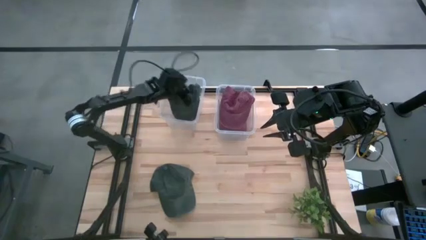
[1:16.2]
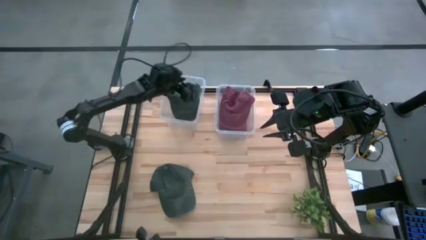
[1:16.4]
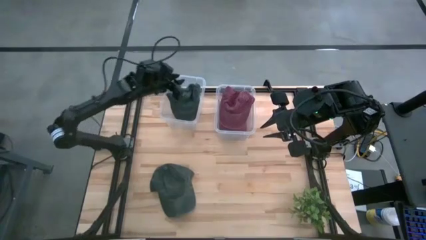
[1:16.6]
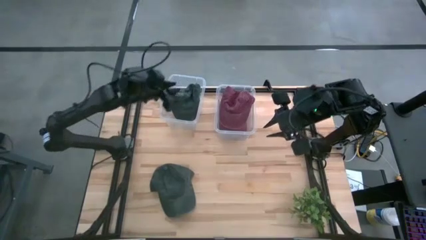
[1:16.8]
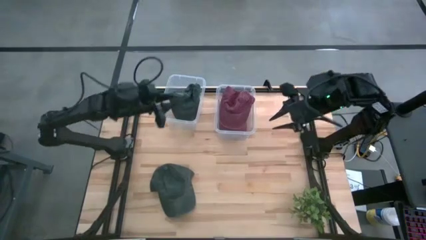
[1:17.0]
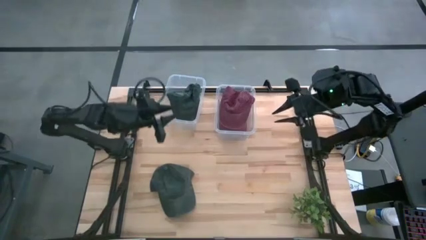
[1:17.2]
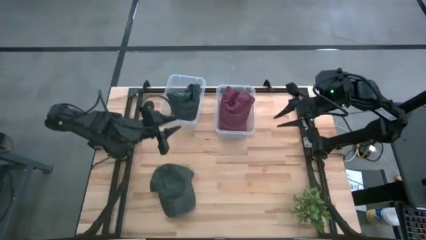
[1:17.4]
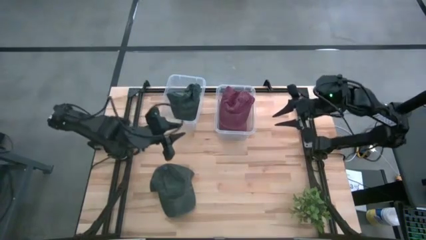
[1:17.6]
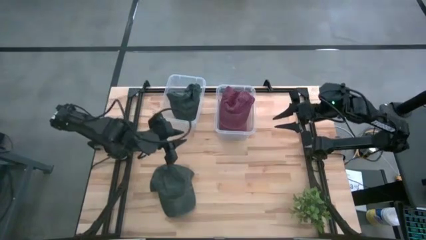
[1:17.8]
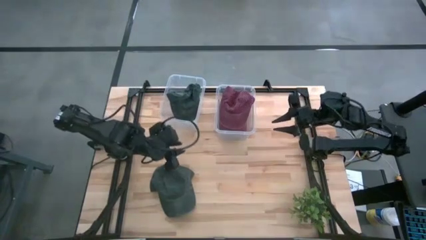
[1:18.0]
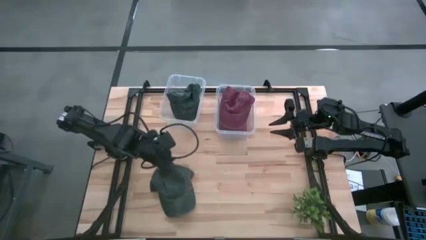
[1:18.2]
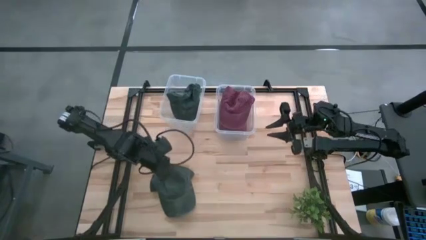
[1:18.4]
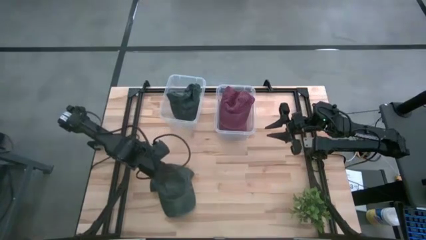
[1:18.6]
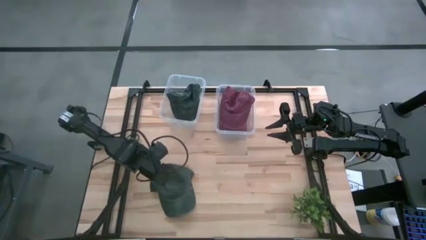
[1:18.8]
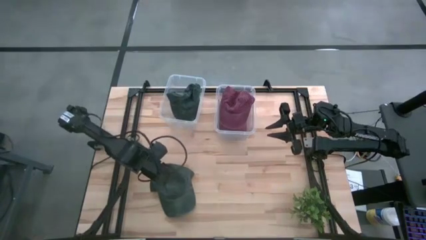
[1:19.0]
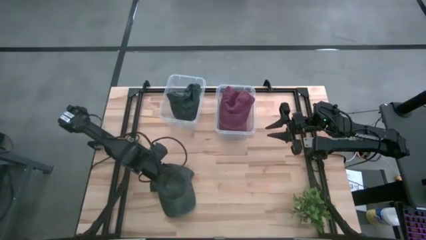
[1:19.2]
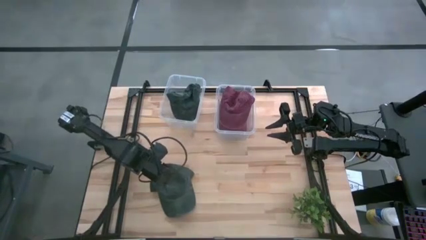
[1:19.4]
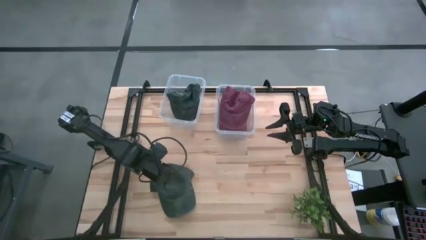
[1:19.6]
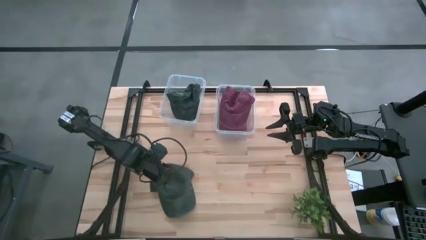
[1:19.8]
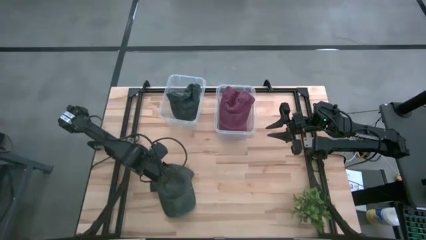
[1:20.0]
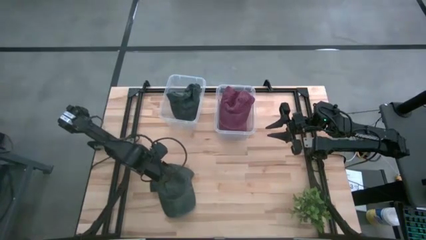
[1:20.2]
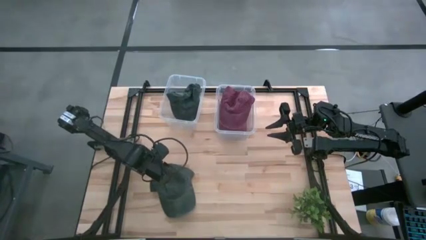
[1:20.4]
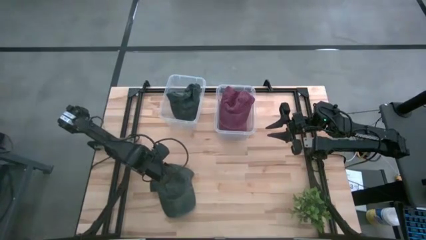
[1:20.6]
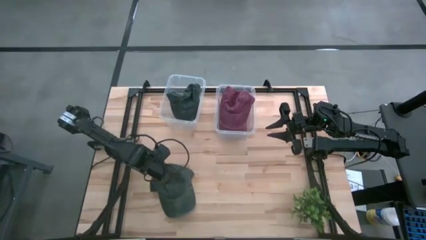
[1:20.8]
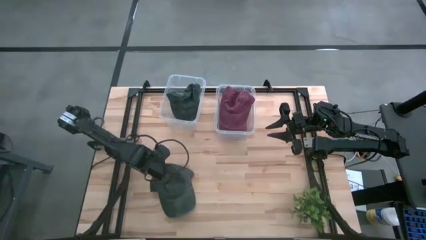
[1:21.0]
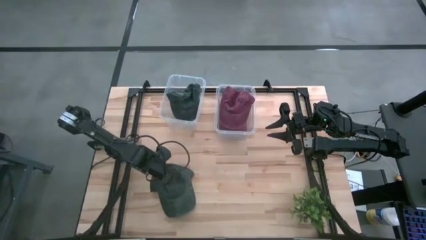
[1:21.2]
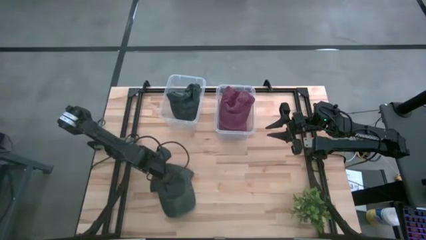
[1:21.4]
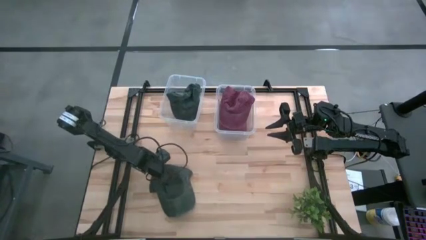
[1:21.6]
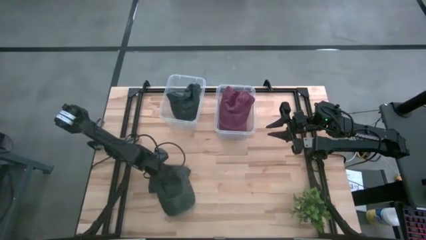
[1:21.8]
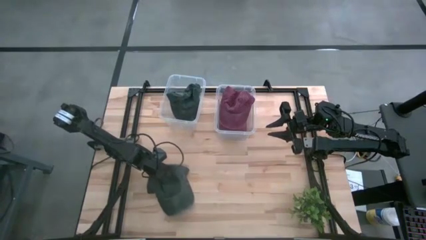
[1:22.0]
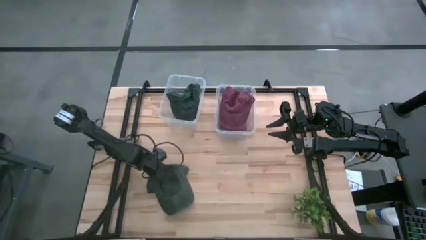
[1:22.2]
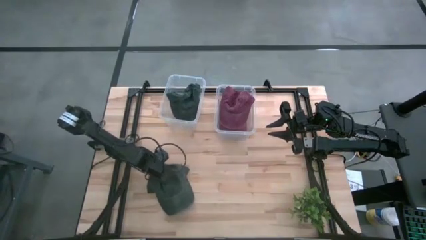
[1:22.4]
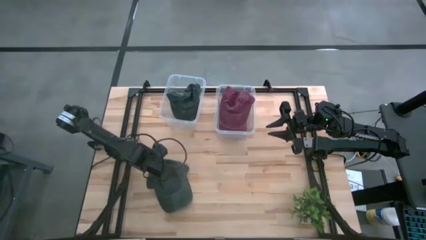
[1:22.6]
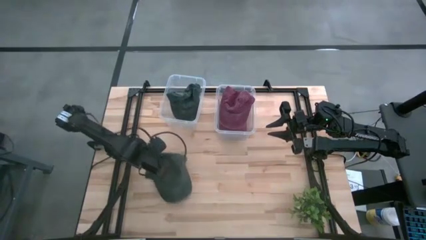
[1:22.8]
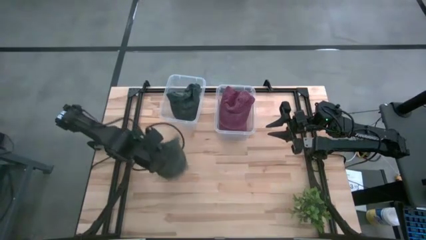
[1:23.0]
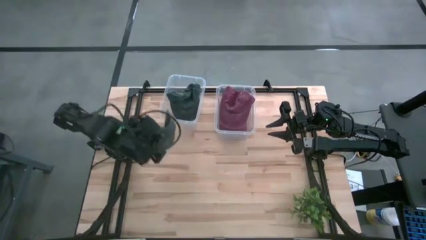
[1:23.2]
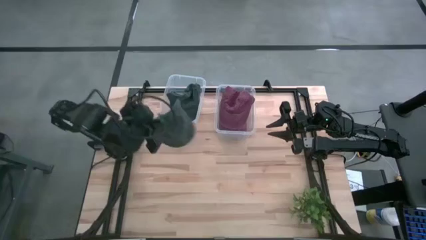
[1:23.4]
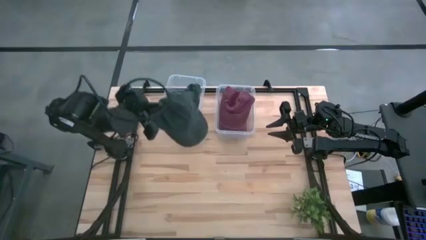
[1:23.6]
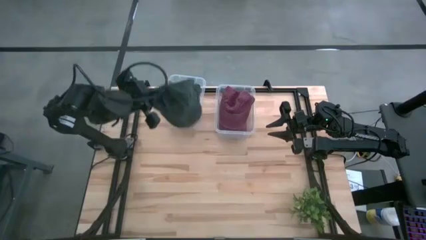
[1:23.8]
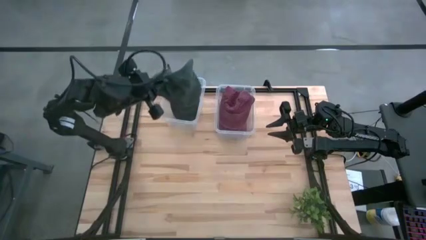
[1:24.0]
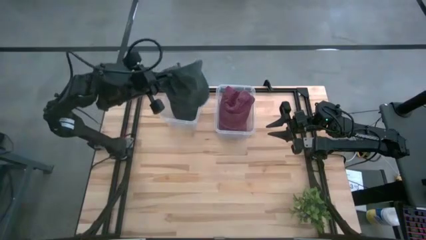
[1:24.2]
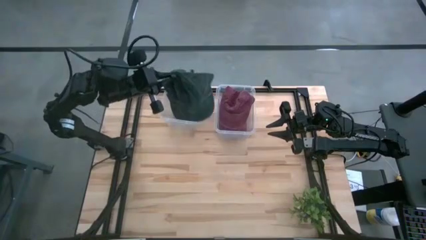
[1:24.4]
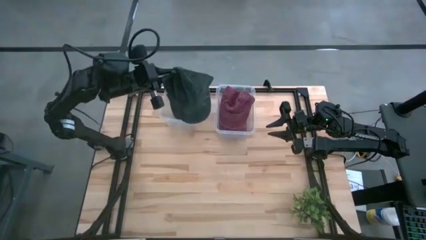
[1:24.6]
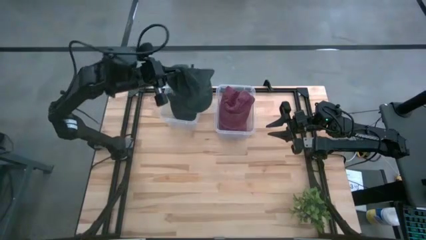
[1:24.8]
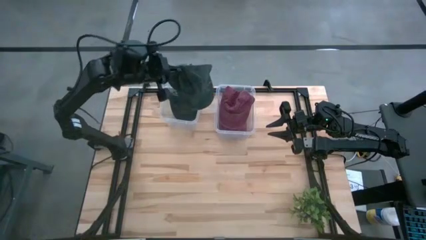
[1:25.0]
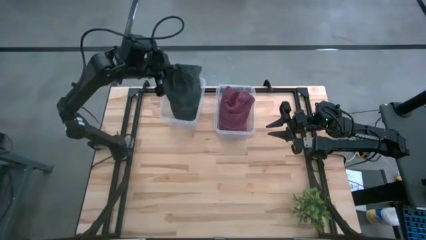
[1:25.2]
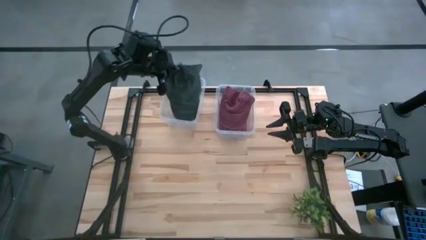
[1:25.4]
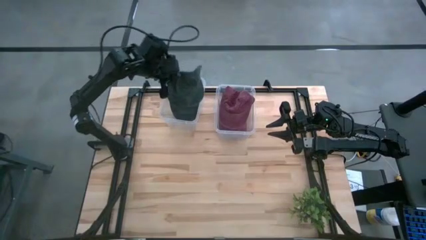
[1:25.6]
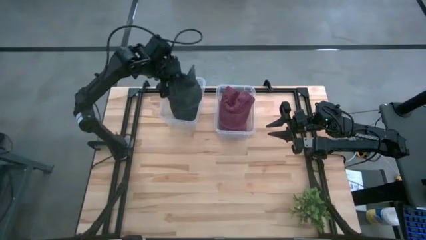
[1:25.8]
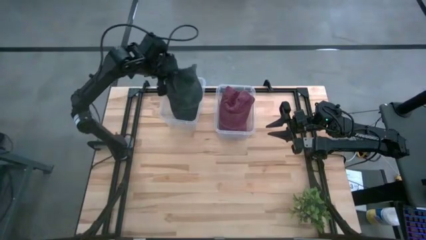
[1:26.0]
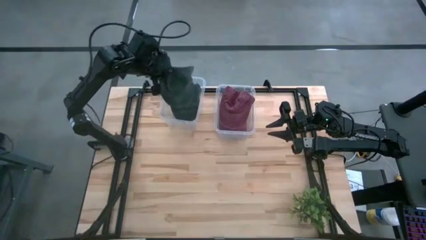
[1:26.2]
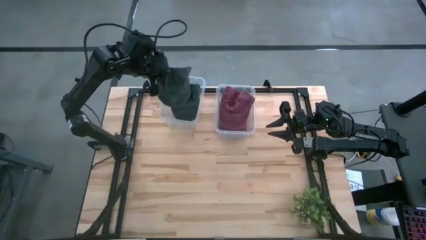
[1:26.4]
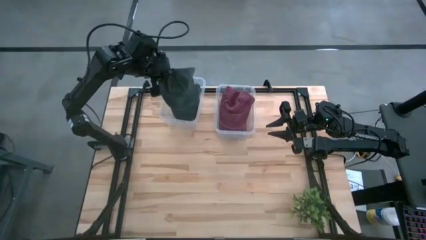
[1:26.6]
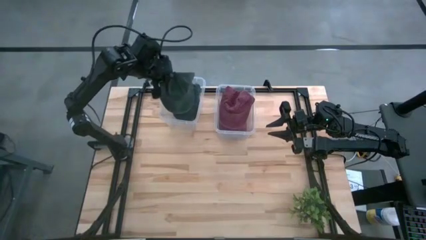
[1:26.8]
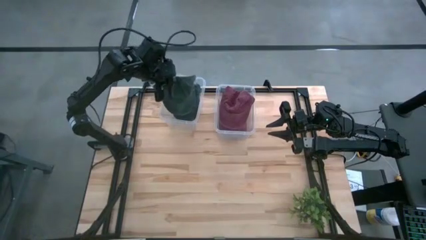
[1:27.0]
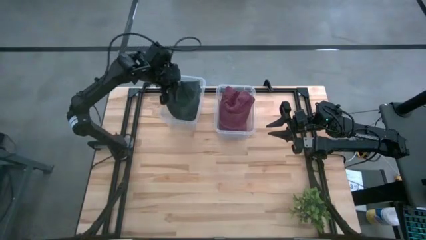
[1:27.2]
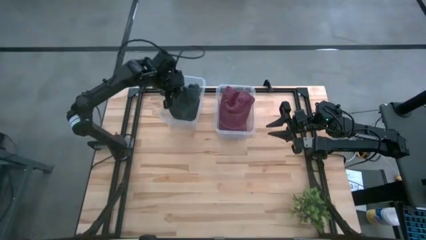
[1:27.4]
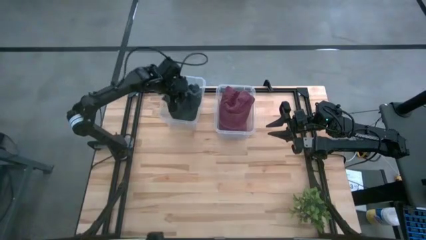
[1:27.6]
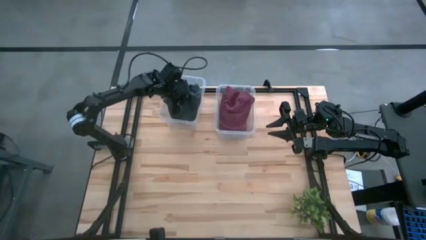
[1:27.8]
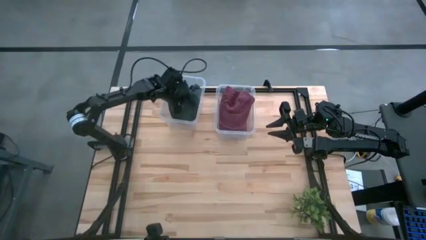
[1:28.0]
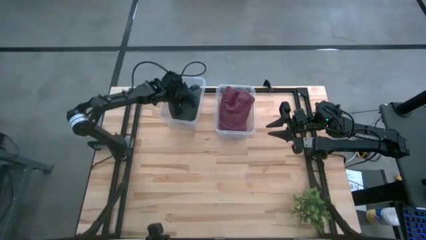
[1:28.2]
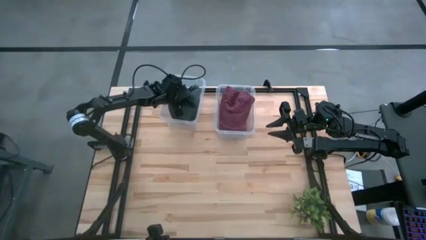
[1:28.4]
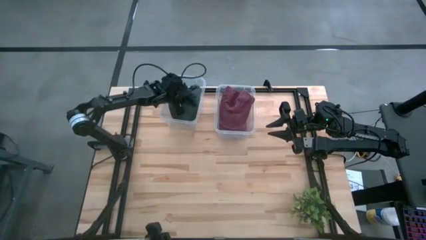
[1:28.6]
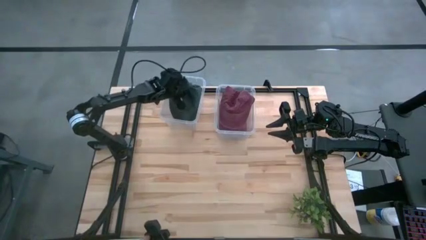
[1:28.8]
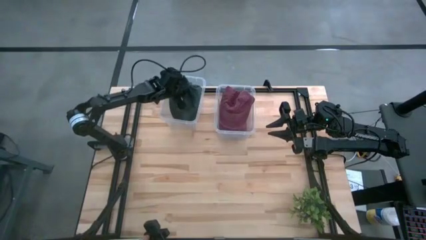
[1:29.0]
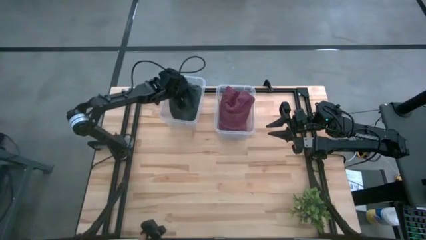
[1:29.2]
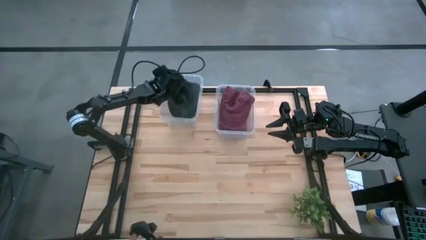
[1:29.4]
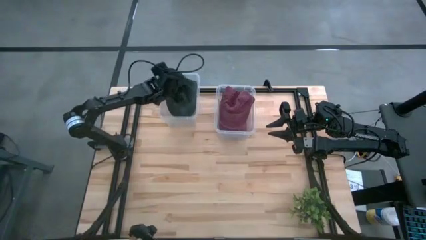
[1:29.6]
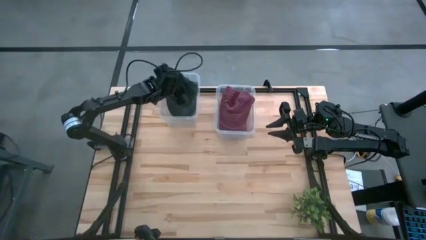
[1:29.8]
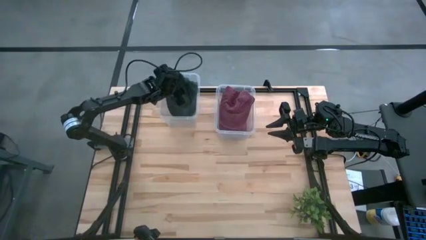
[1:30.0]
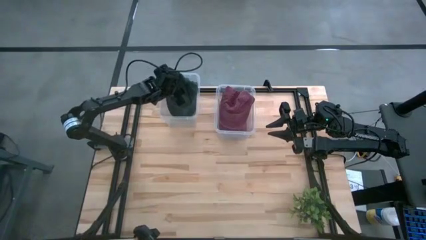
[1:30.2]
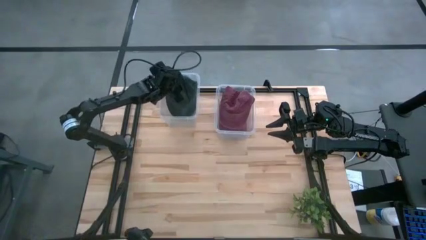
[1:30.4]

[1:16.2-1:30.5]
Task: Pick & Place hat
Put the gray cap into the left transparent bin

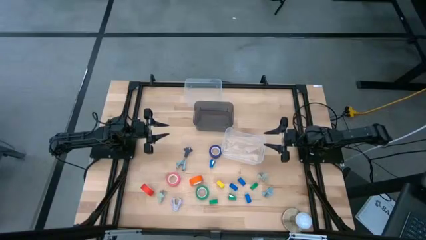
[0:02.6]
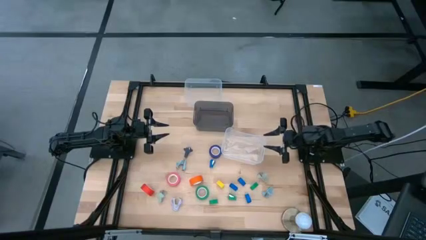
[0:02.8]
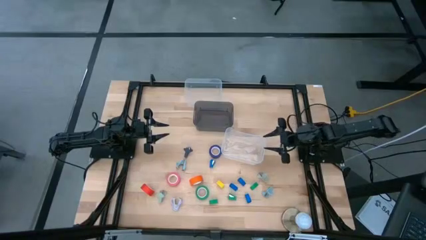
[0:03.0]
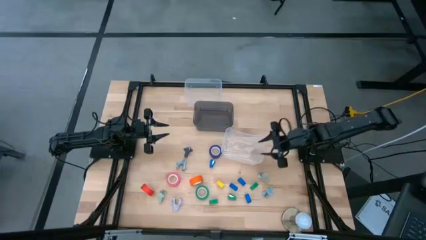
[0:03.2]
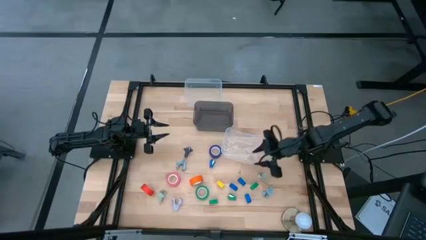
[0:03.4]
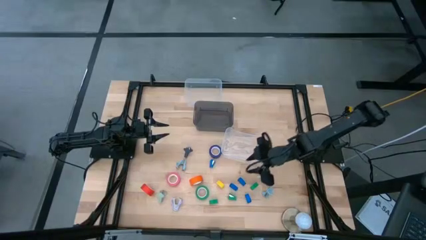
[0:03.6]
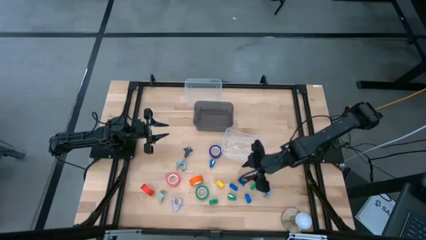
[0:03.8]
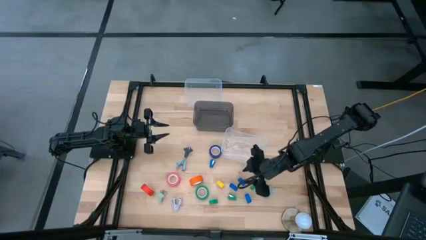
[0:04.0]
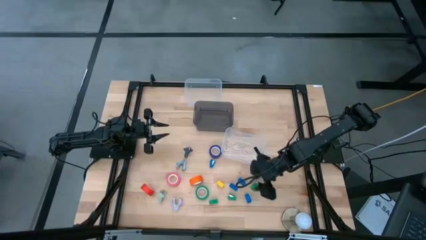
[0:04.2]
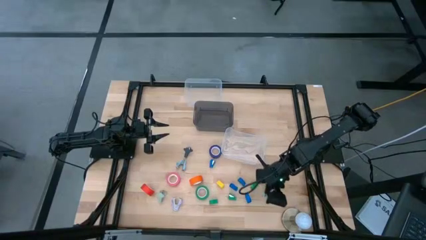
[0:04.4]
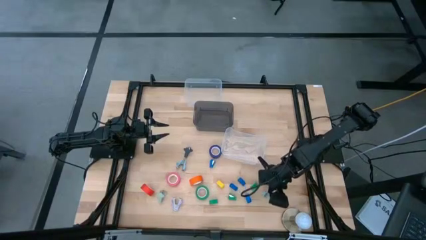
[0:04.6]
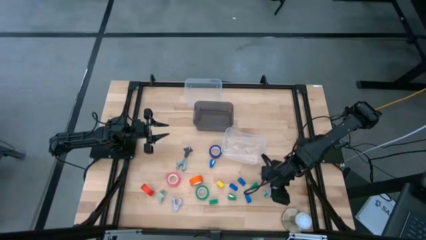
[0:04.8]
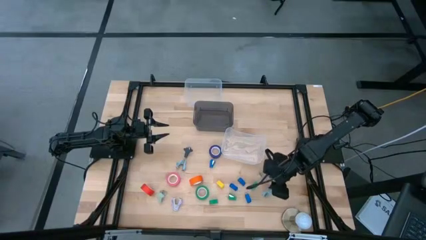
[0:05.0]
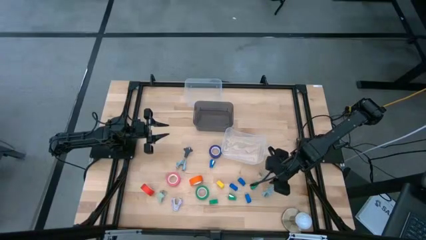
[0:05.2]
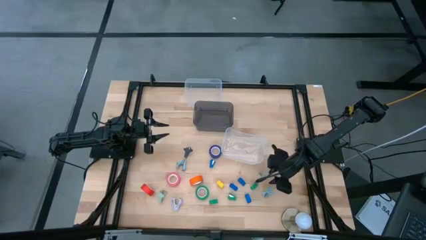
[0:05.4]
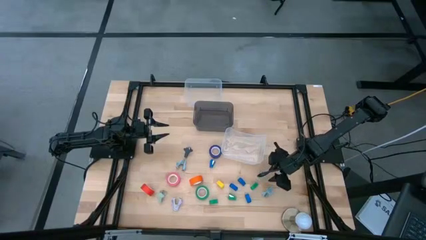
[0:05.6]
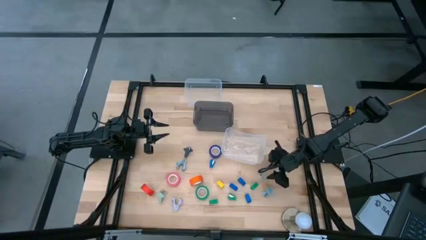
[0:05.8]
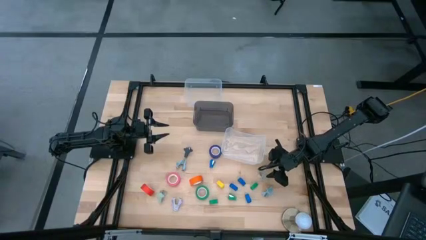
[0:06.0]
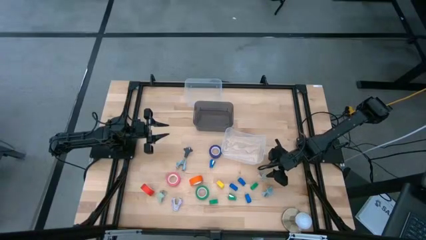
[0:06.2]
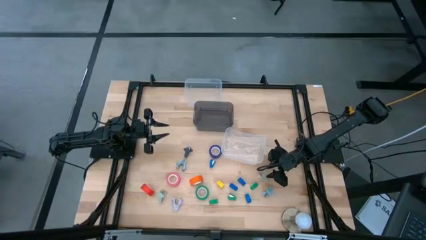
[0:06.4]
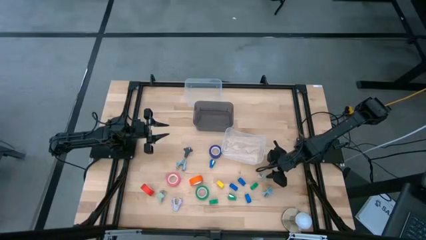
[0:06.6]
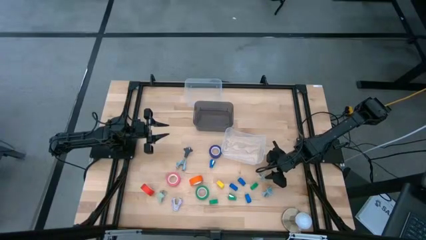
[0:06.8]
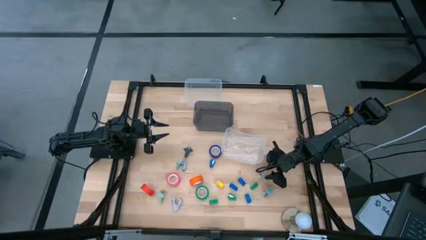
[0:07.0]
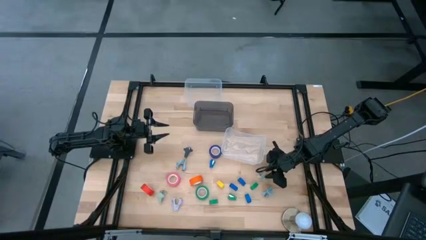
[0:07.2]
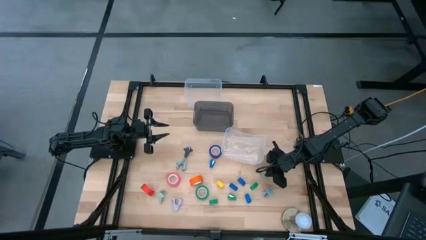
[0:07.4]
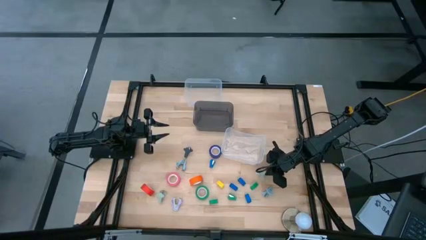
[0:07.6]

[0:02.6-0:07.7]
Task: Pick and place Stapler, Stapler remover, tape
Put the gray staple remover into the bottom transparent bin
